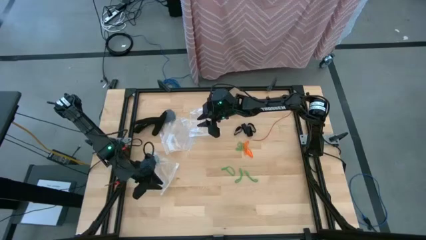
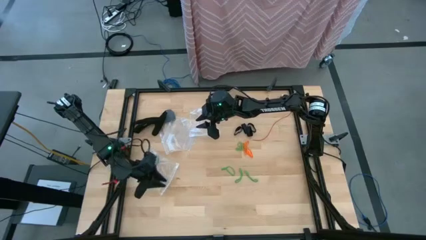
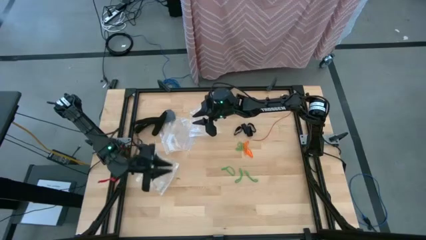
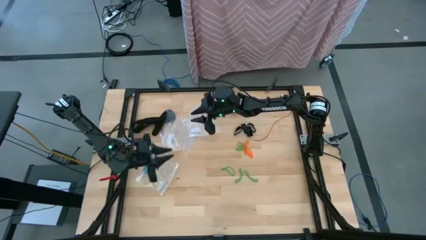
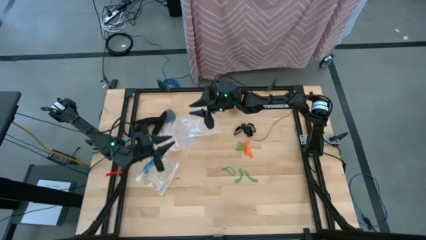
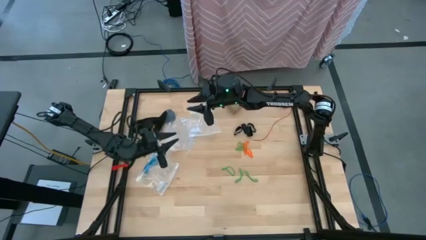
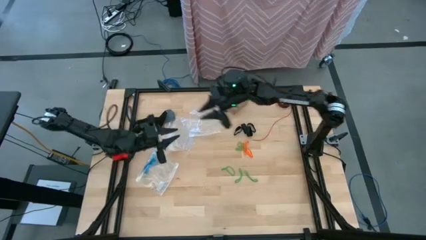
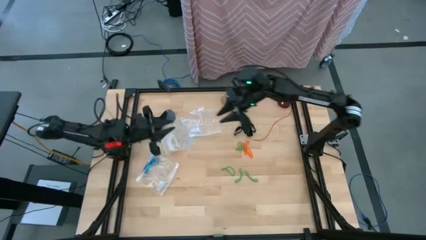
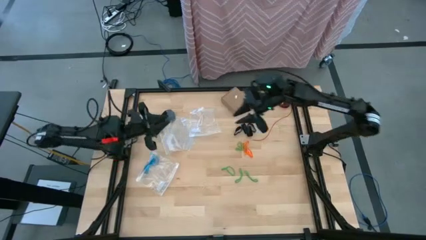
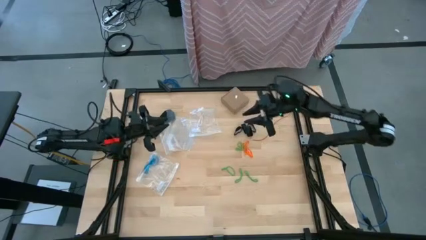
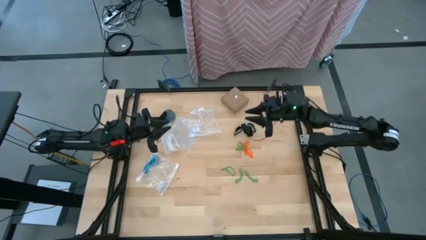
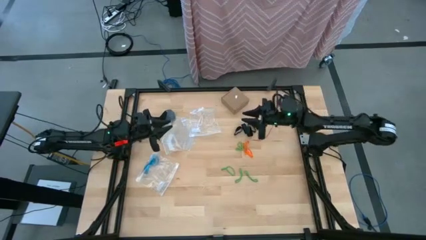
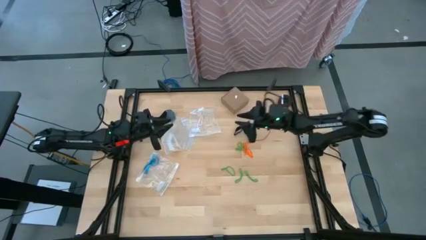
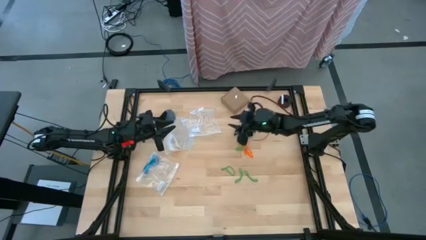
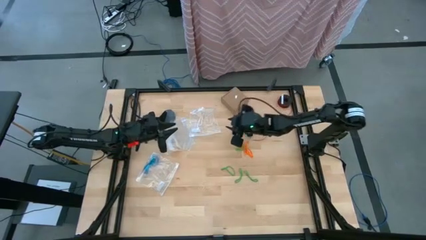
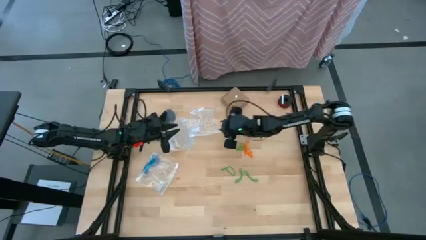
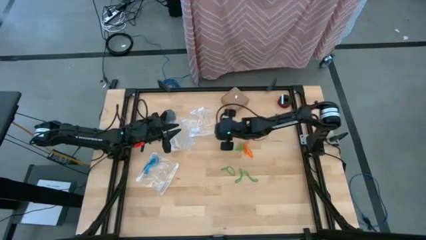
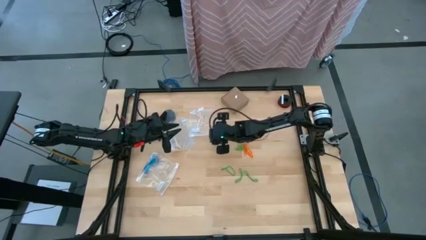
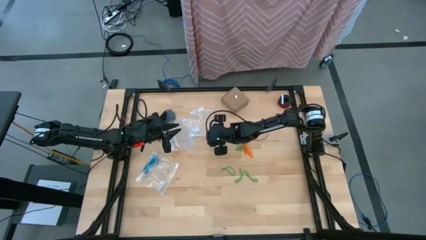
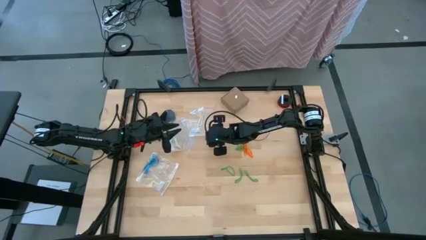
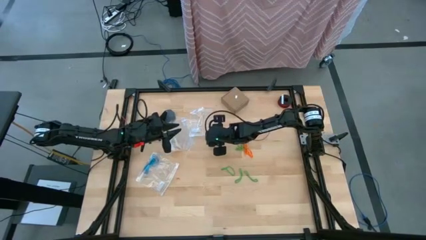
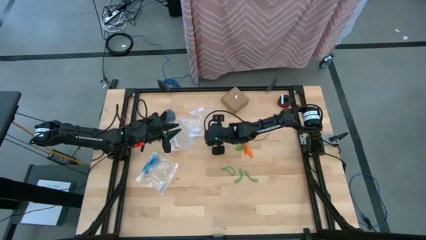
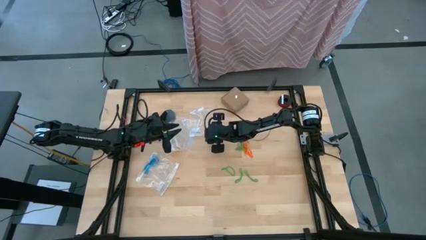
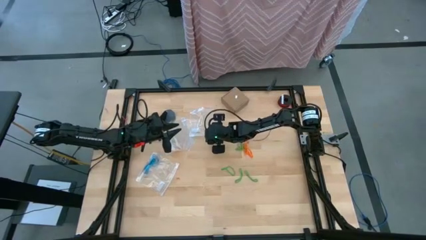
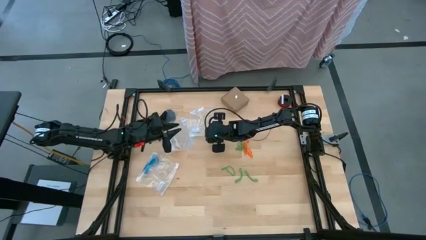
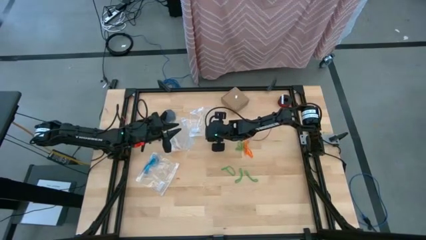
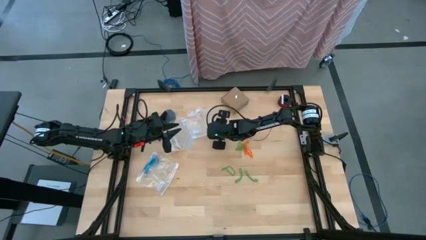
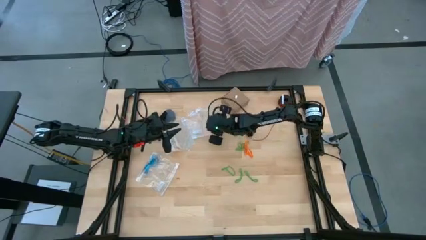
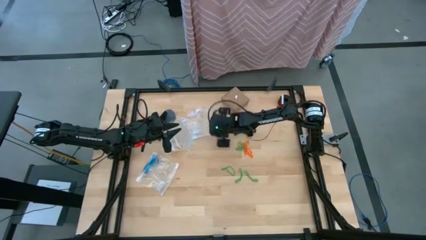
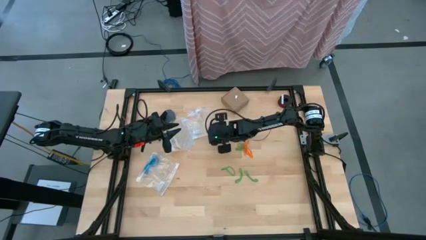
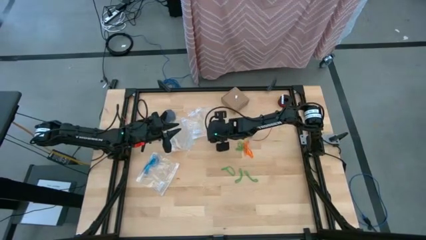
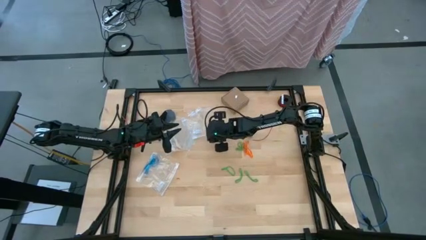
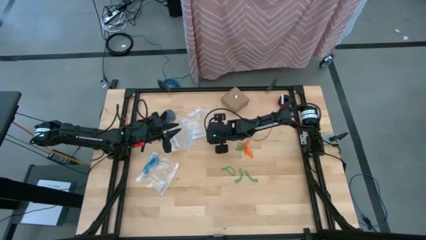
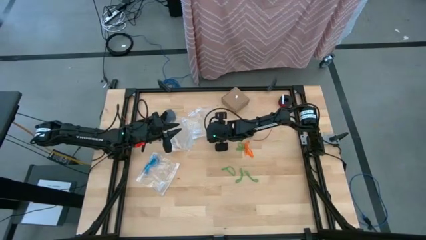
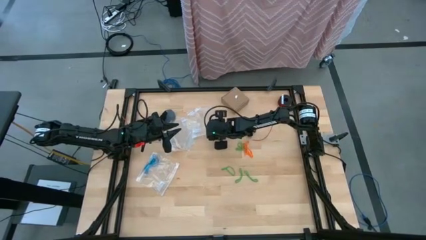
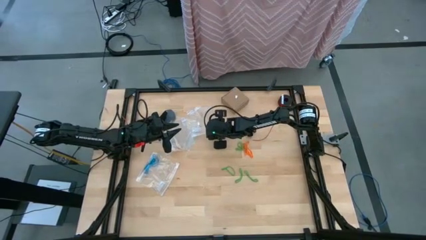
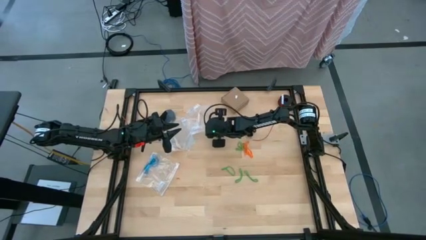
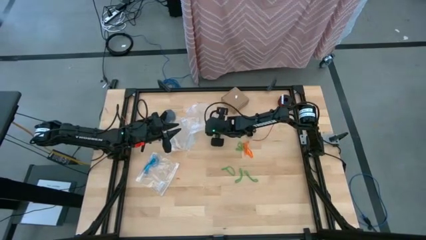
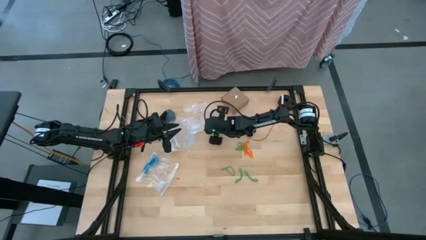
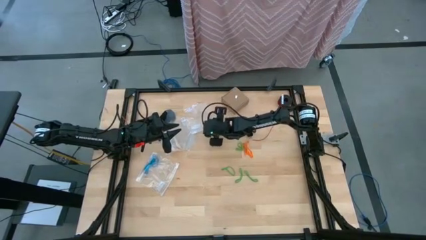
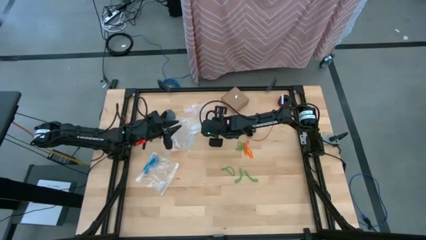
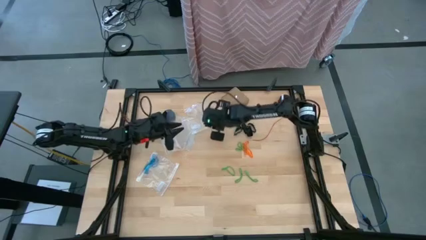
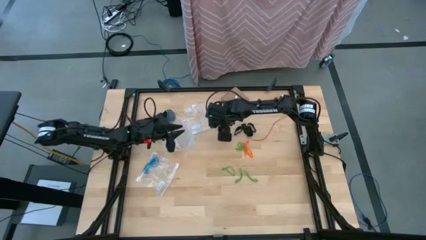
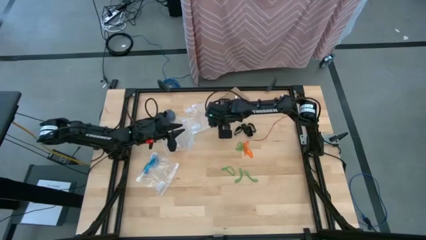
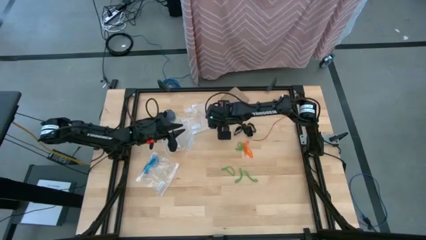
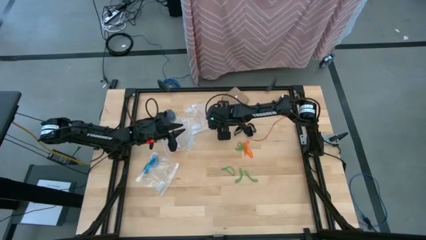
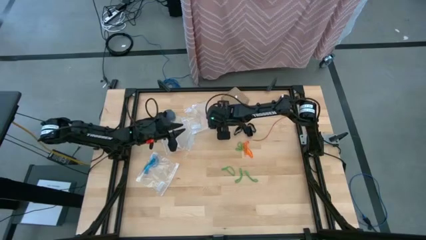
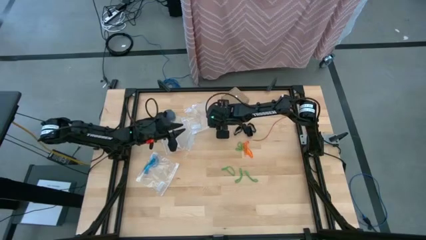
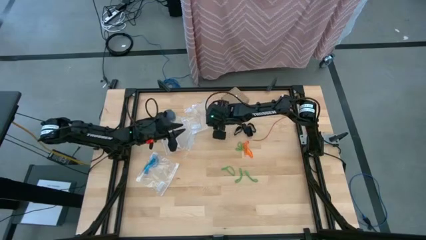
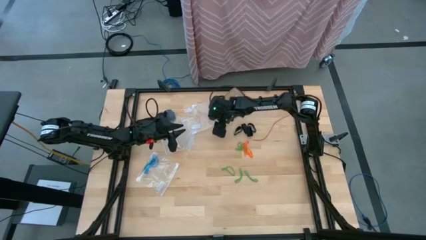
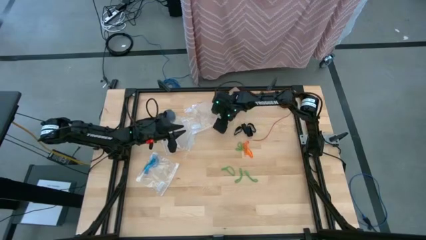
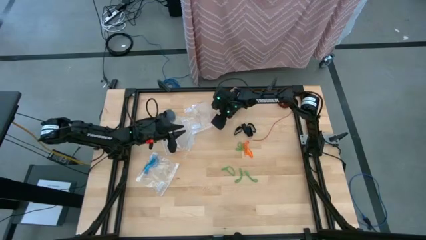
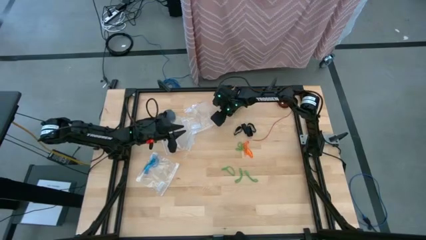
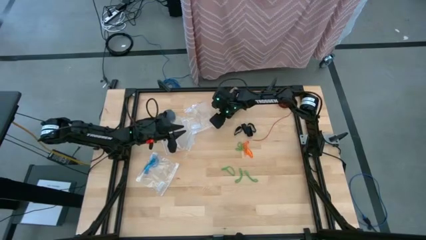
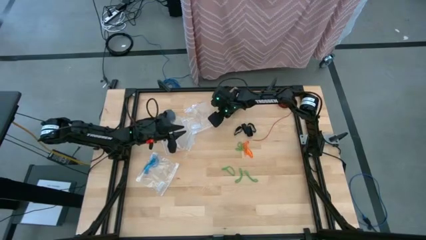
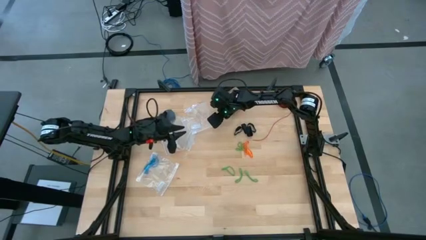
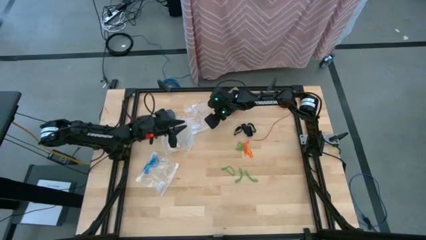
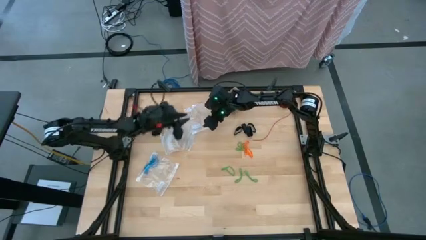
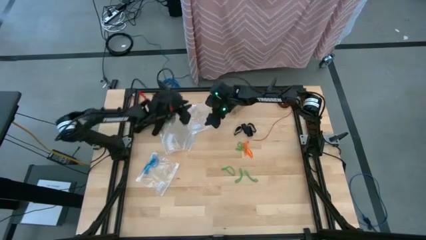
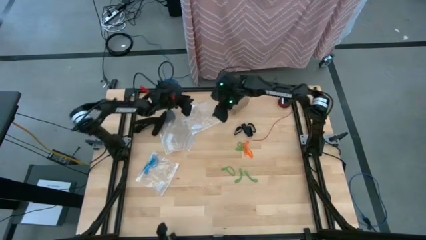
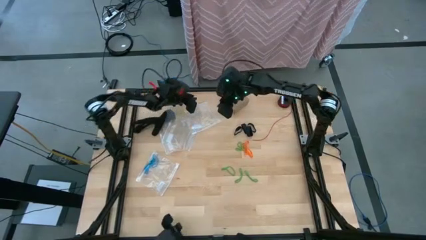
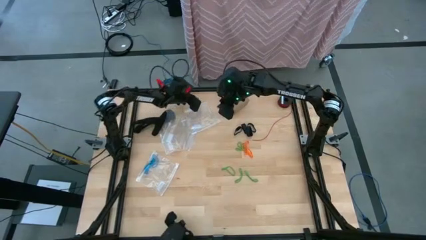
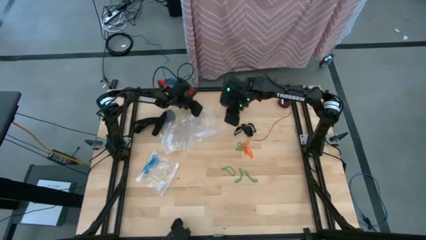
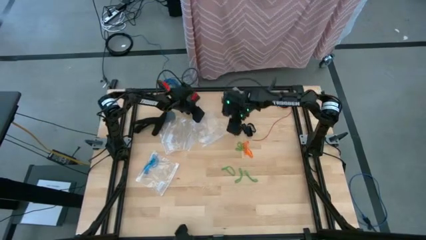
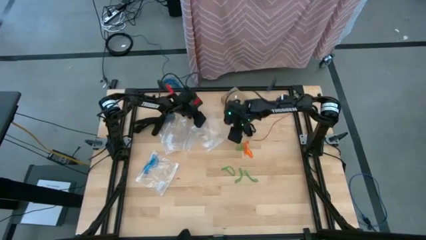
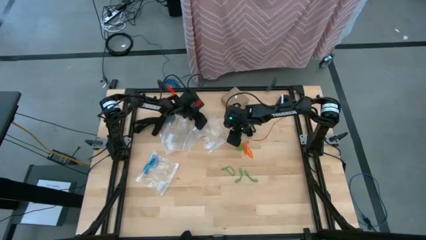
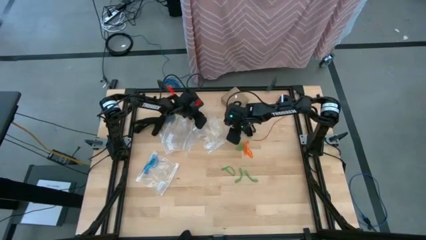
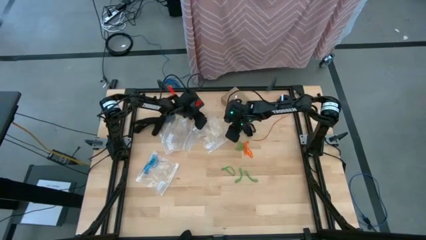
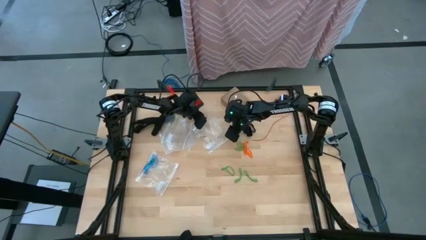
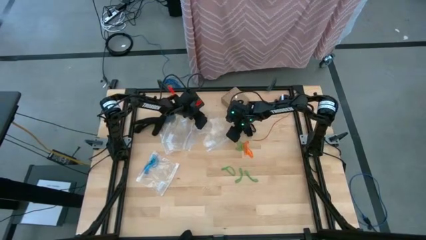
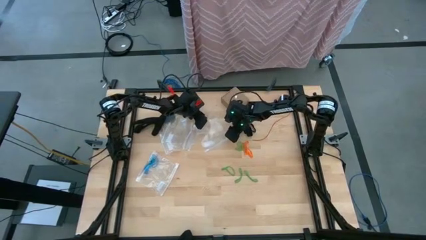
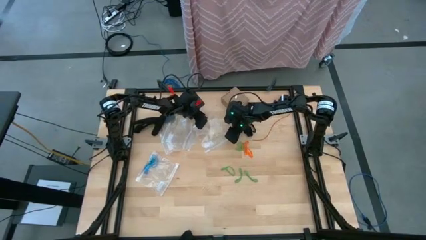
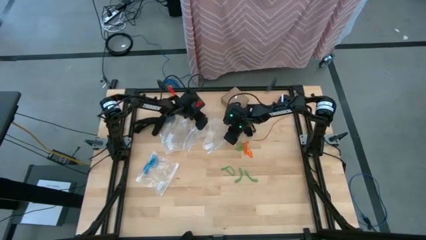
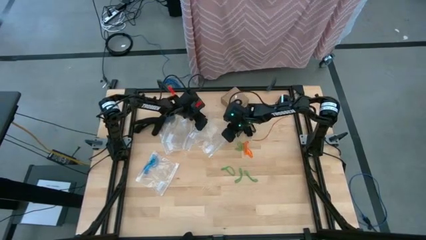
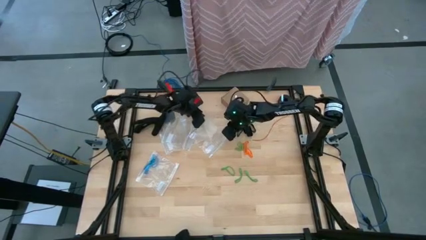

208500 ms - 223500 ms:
Task: Sort rubber bands
Open the transparent zip bag

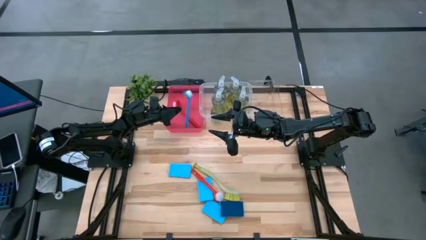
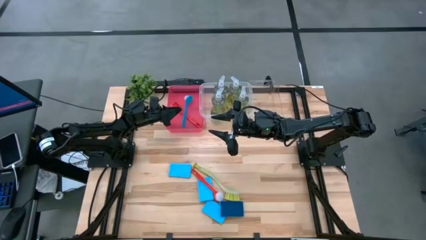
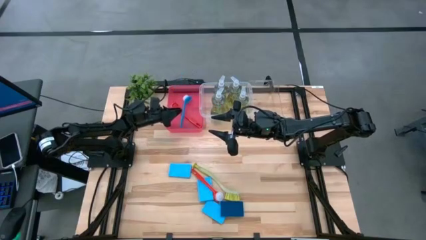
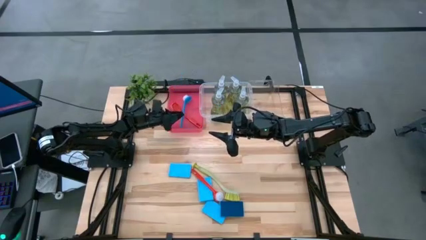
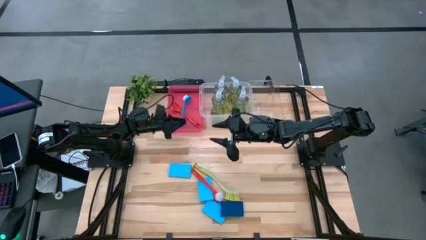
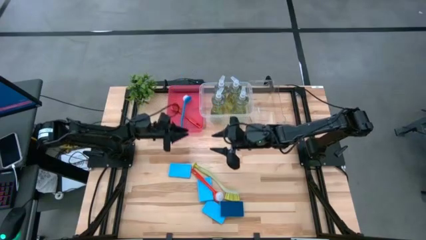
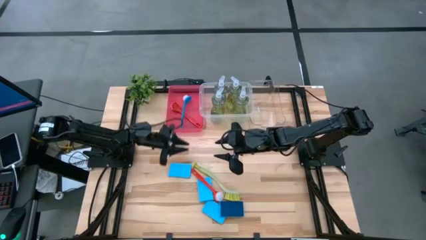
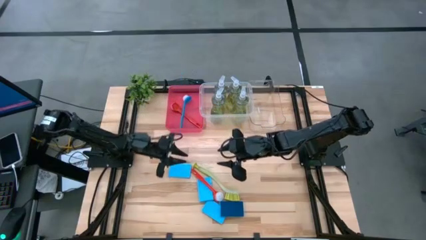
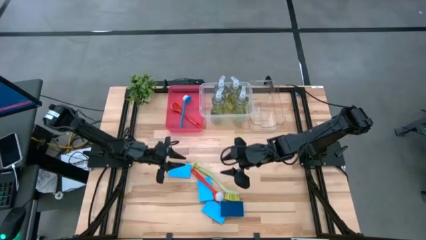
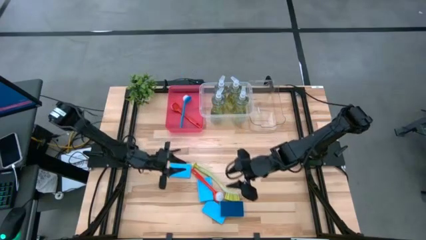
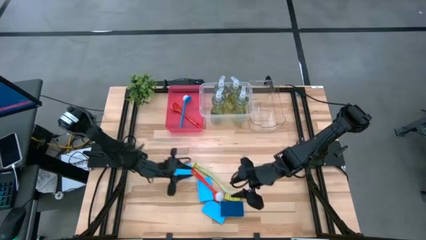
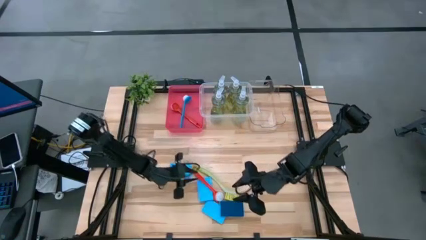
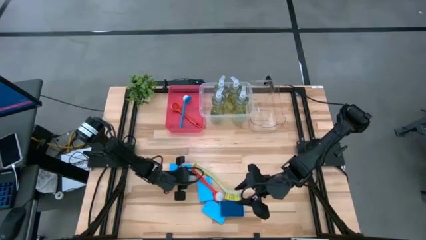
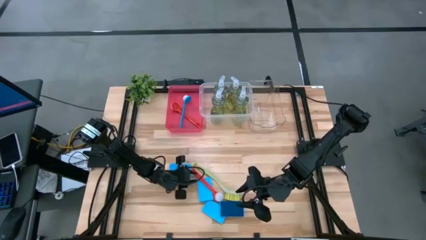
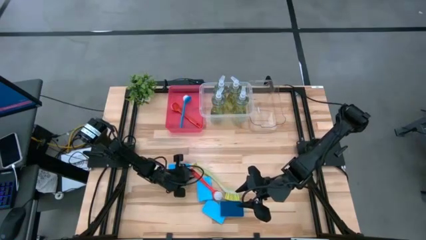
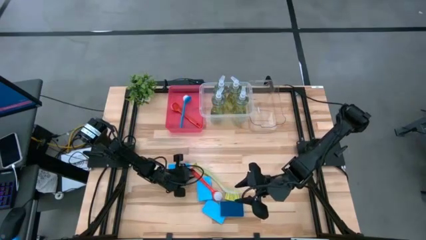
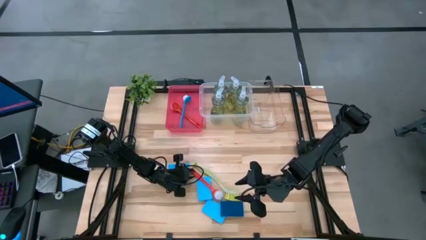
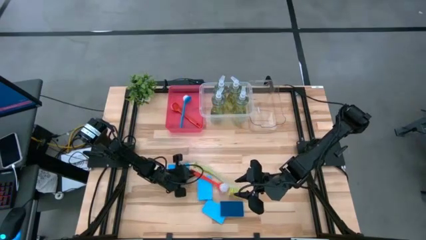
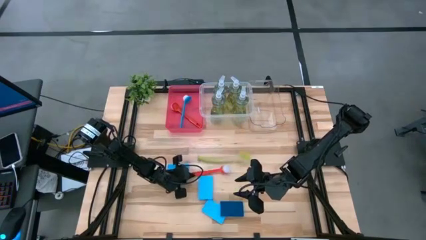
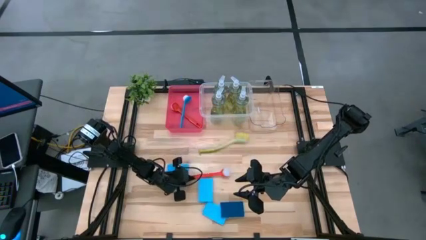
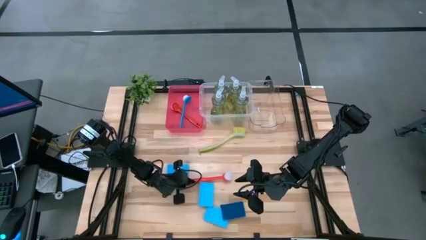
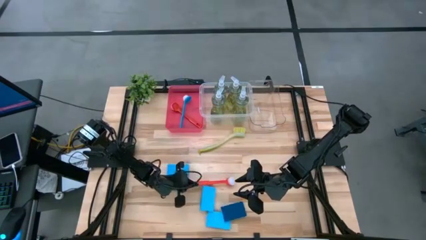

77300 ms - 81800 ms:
Task: Pick & Place Kitchen Sink Supplies
Put the red toilet brush into the red bin
